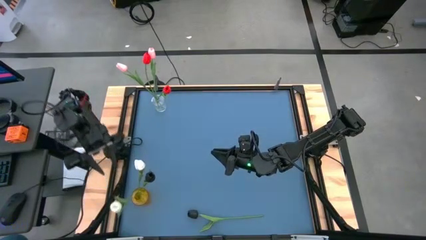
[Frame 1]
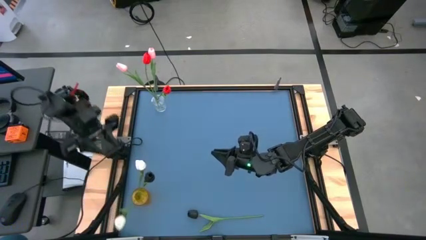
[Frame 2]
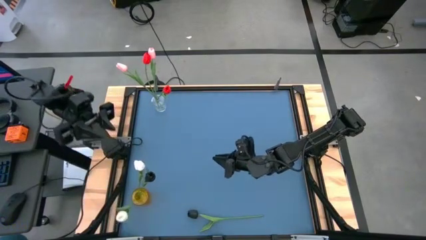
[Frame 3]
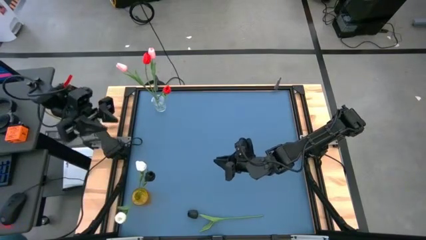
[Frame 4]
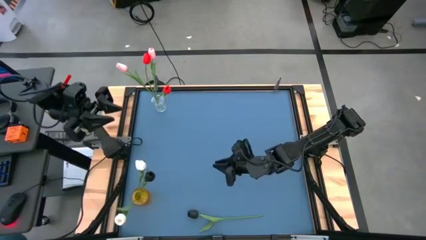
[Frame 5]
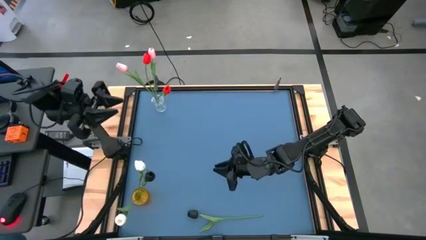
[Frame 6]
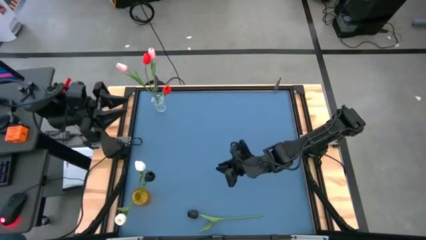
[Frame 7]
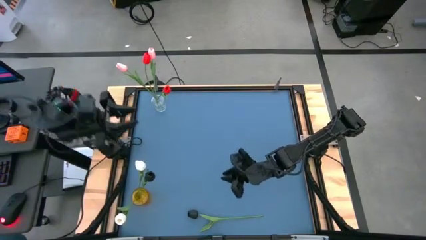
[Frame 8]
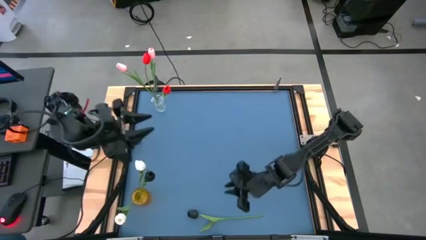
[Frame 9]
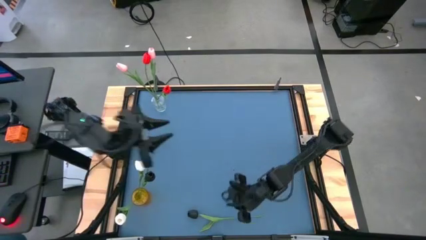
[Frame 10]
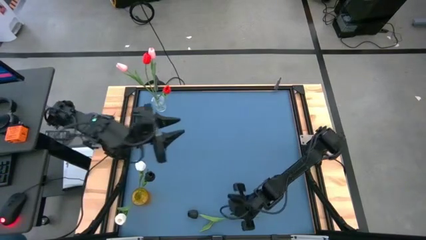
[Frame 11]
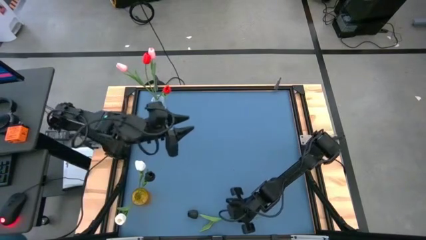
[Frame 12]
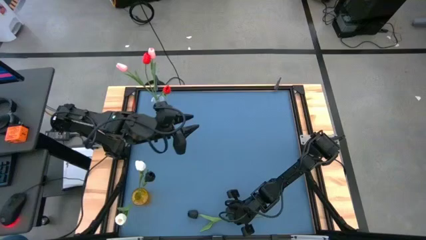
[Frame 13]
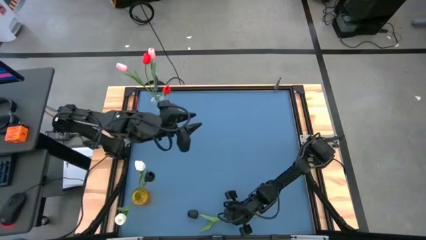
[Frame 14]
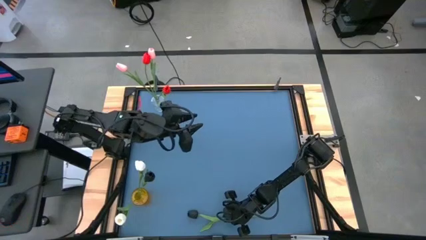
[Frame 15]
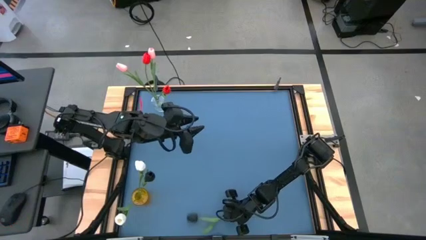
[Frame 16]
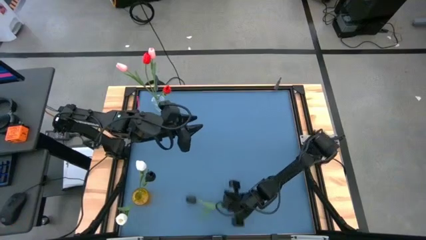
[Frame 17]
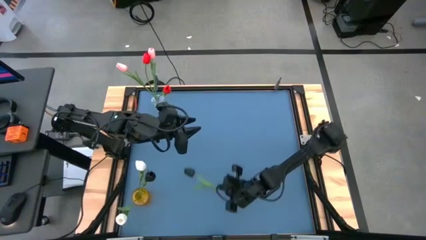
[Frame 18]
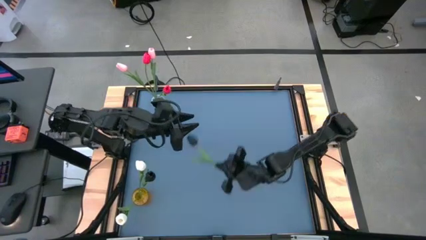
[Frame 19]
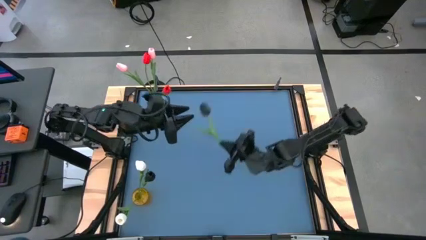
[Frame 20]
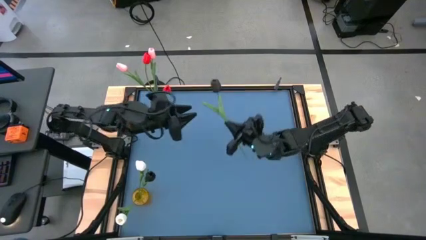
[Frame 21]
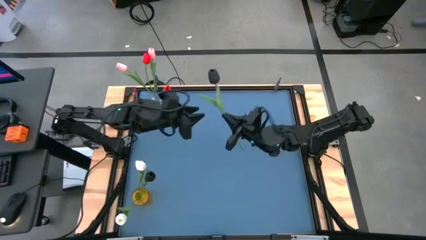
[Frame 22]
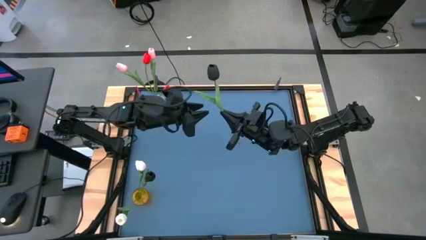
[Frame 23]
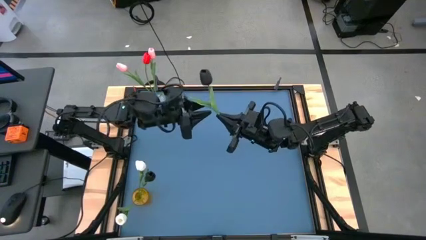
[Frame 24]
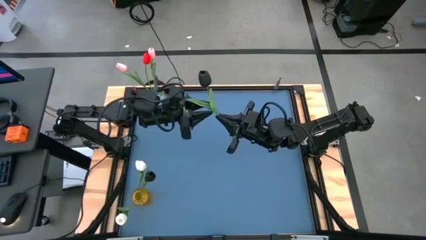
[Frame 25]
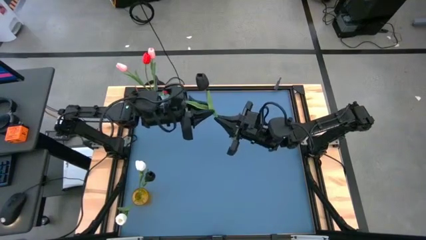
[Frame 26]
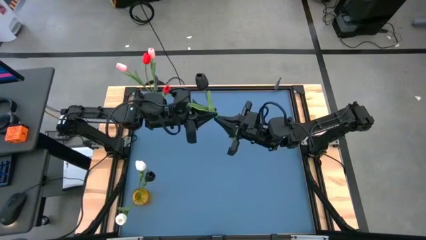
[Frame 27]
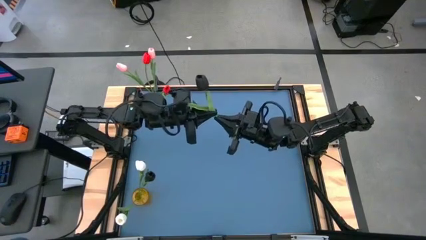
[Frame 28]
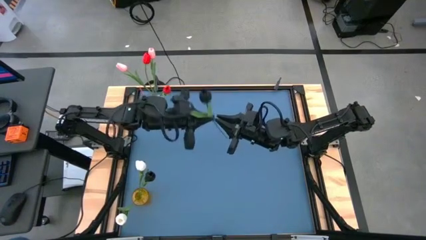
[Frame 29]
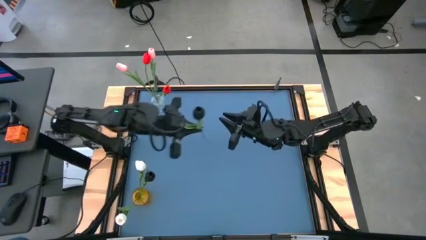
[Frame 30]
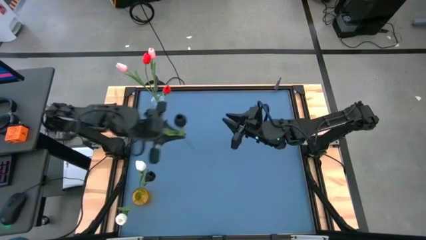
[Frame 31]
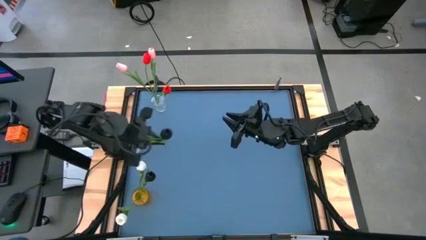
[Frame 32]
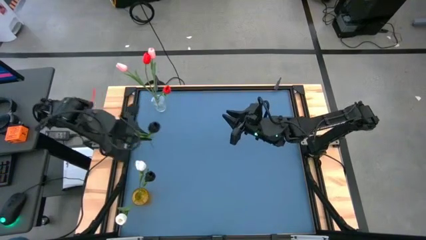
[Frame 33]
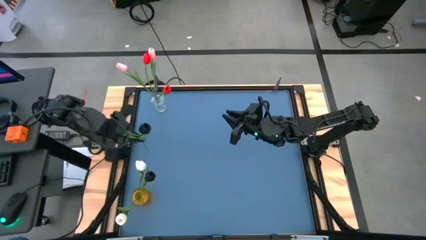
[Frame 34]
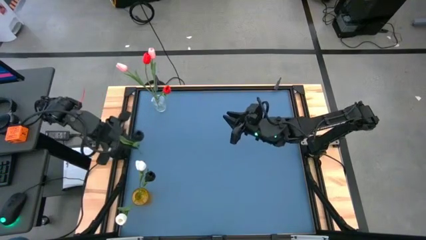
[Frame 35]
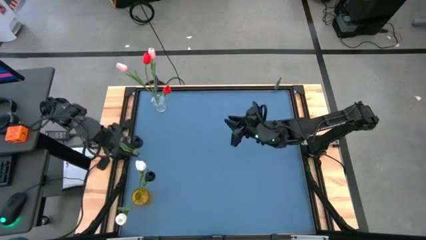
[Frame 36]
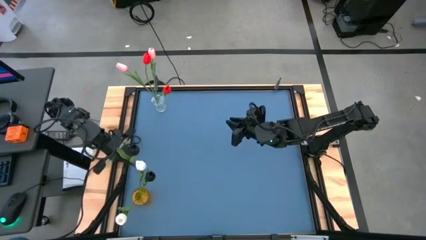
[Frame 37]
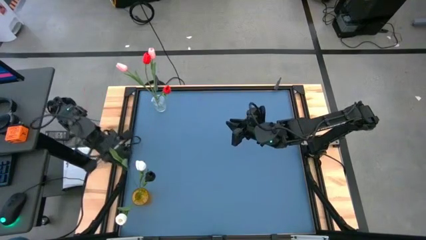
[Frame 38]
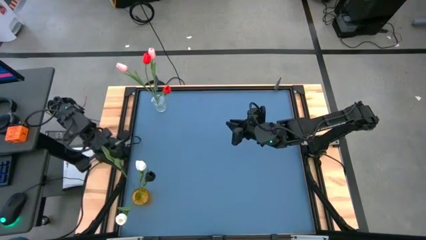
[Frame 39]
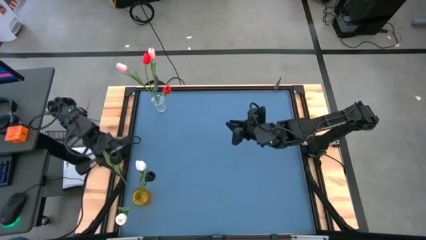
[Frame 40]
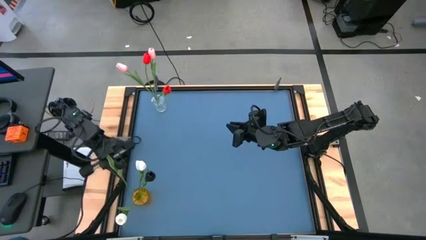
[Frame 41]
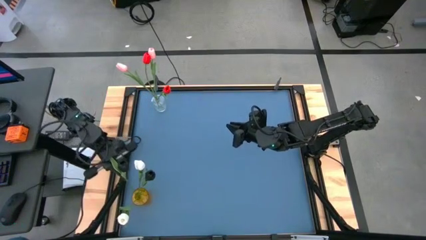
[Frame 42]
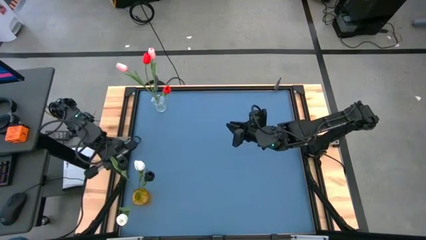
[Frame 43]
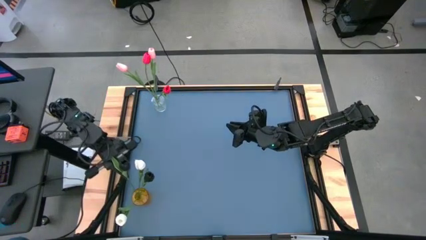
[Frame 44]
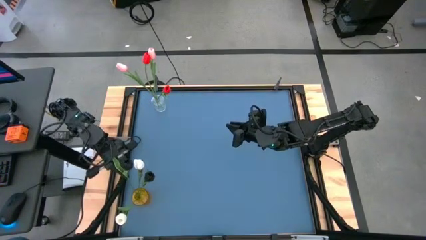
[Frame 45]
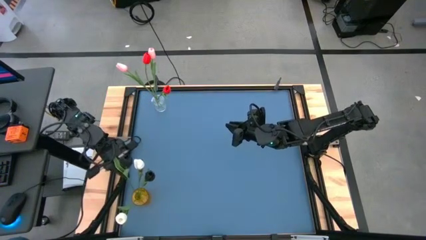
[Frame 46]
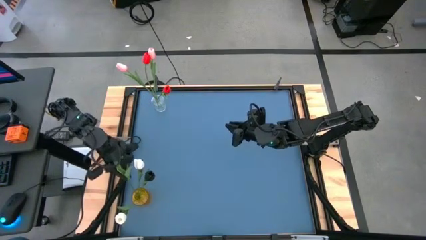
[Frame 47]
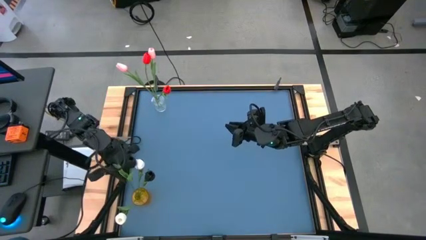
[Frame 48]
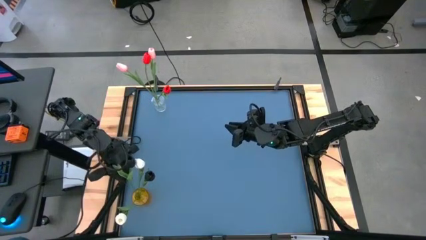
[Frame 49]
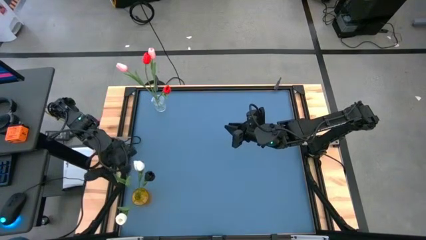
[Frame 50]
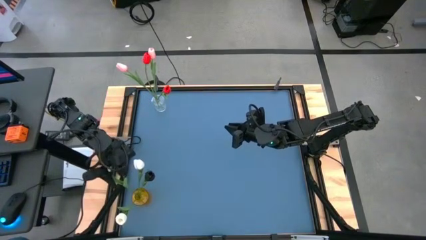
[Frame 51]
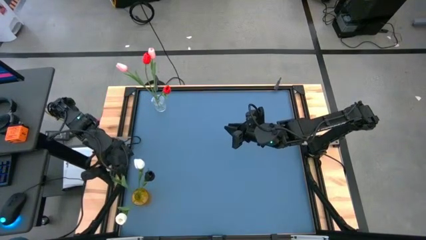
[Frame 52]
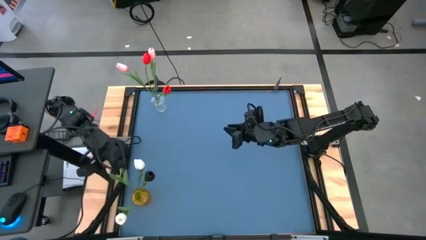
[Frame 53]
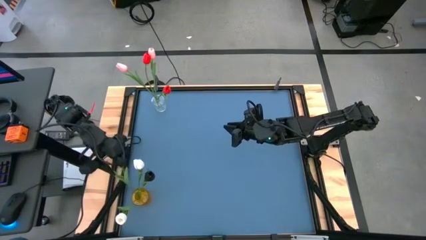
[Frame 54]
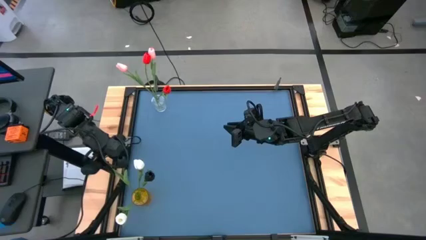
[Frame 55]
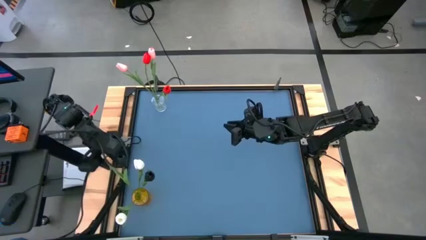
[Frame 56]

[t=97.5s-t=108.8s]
Task: Sort flowers into vase by color
Put the black tulip into the yellow vase
